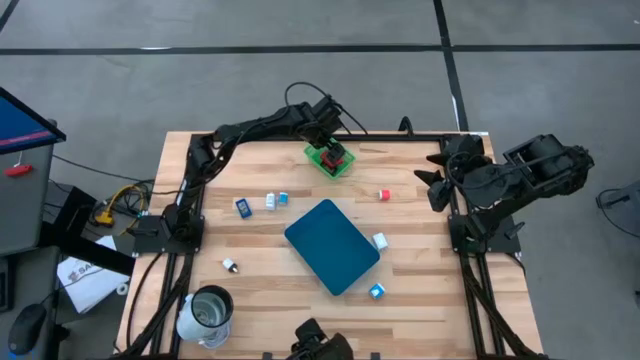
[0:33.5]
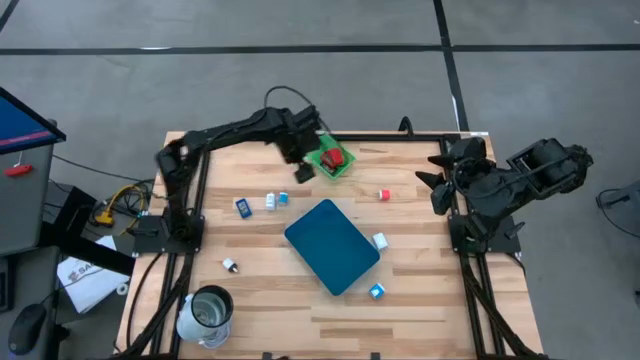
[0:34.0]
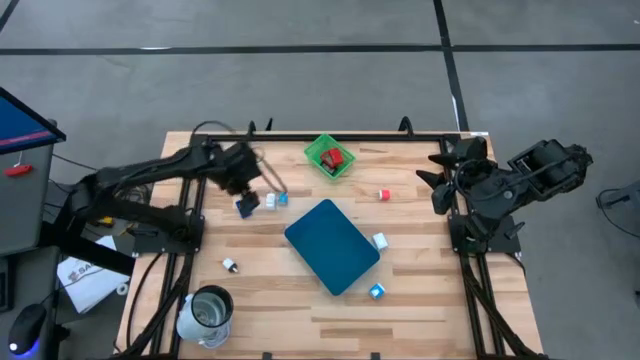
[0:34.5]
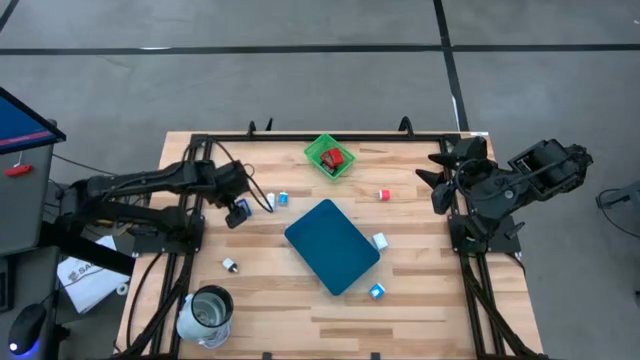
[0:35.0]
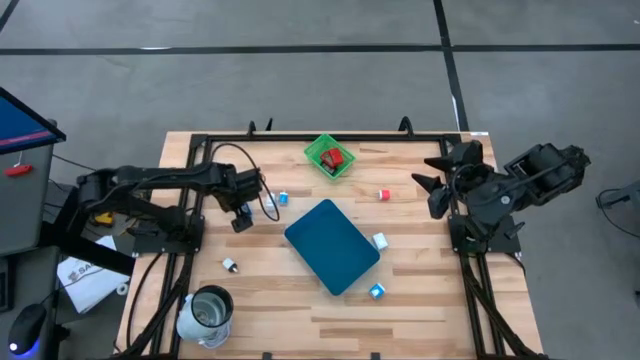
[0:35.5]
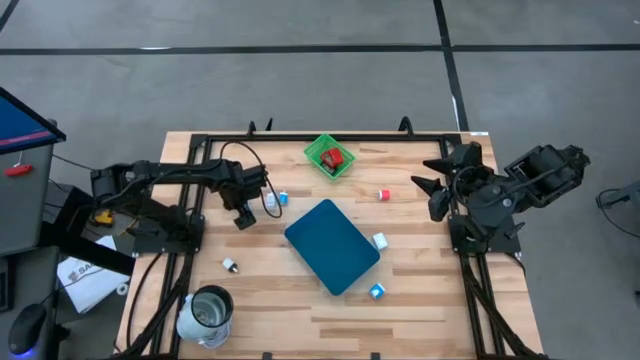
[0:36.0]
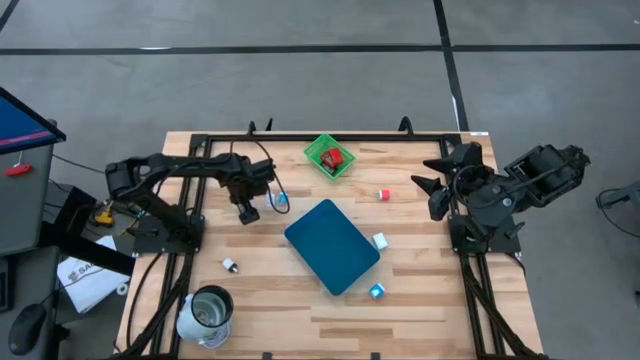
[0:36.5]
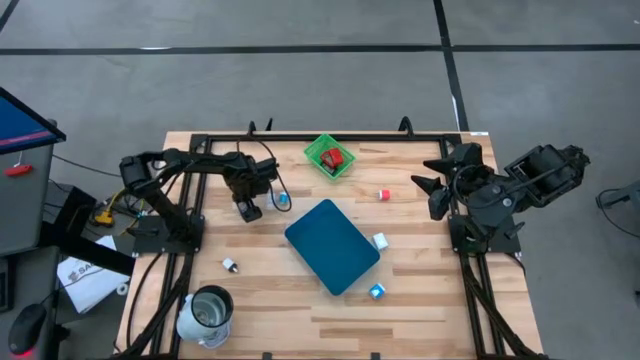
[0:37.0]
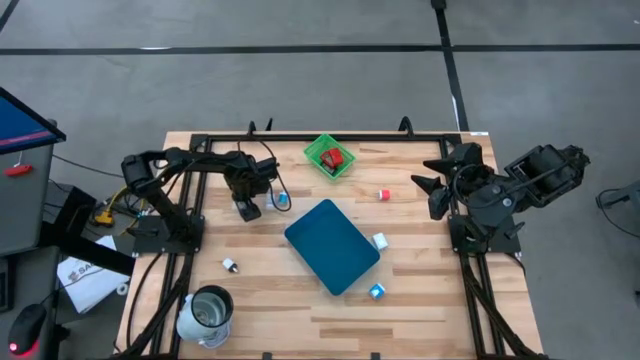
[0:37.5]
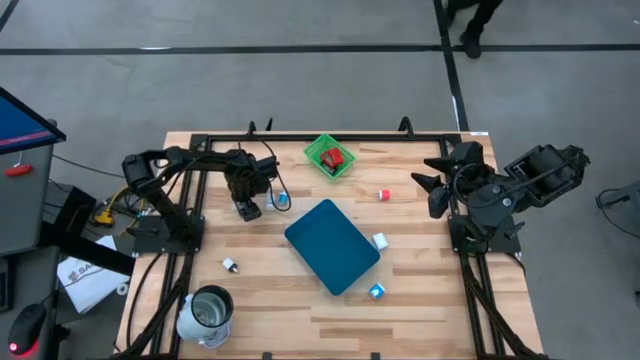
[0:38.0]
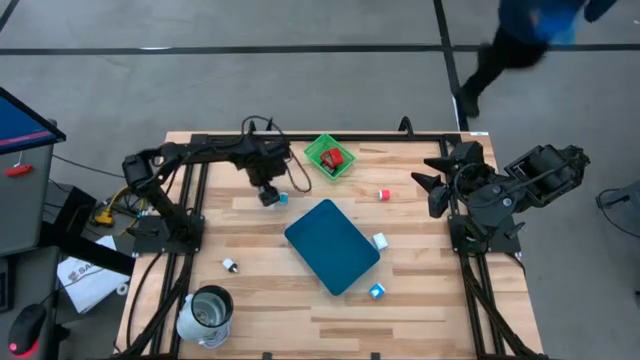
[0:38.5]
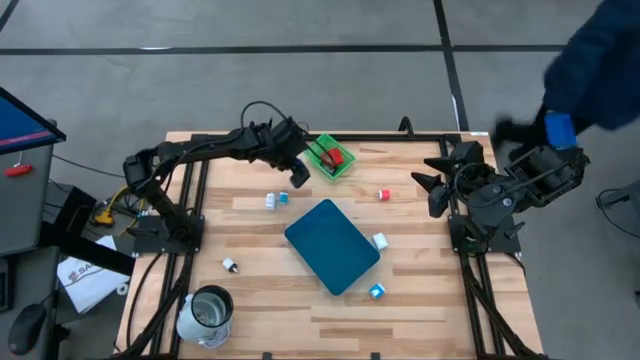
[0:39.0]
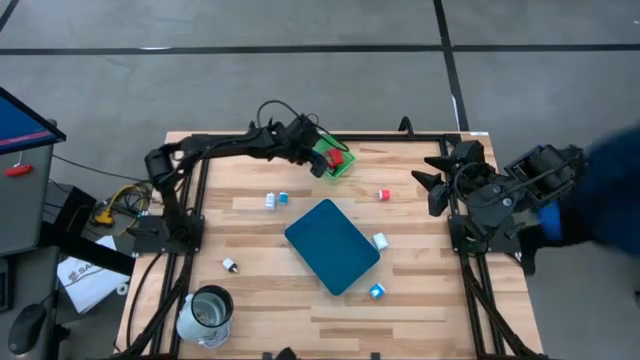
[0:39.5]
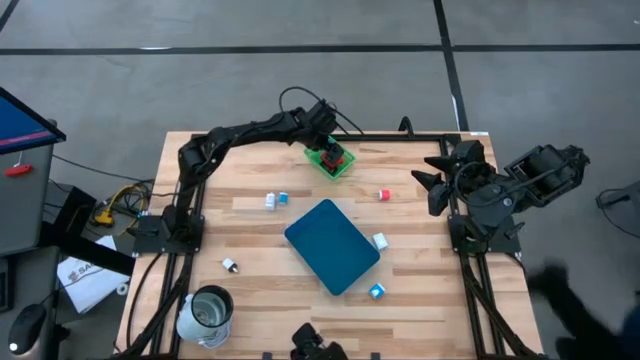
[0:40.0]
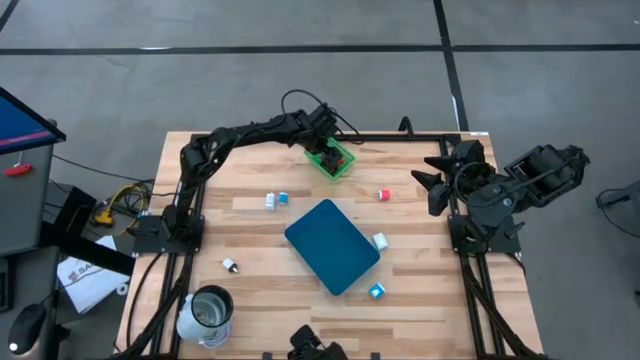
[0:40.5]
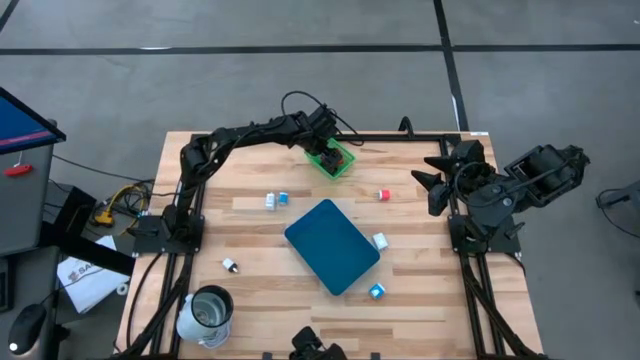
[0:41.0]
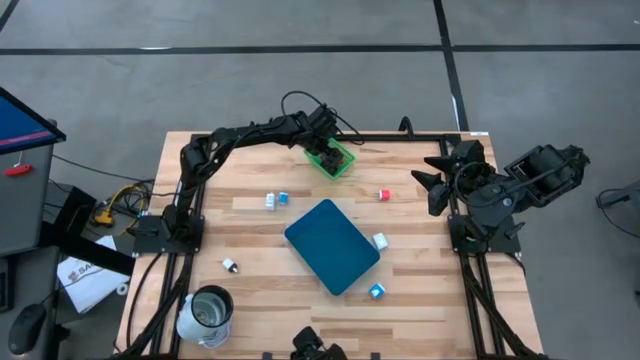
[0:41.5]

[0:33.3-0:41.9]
Task: Pick & Place Office items
Put the blue digital timer into the green bin

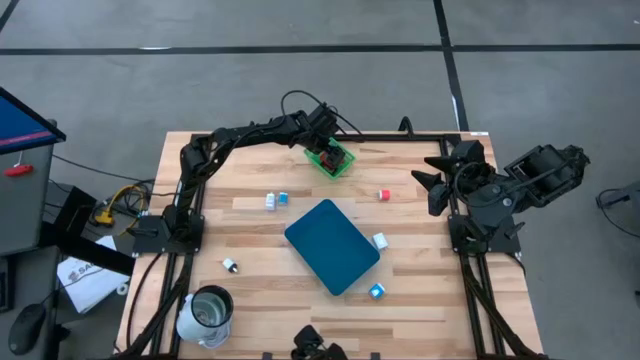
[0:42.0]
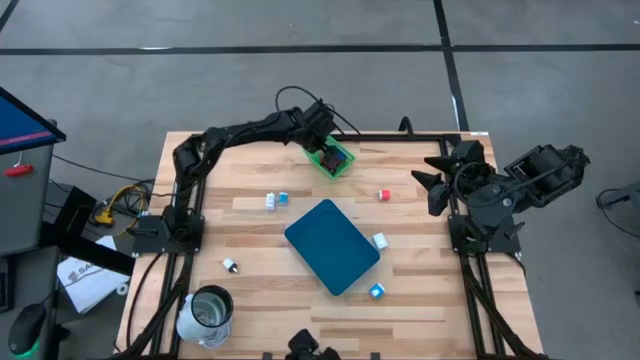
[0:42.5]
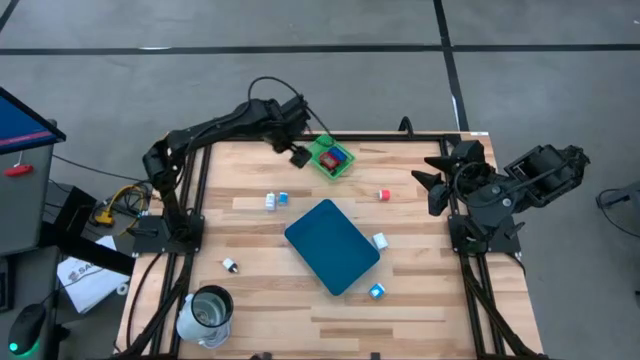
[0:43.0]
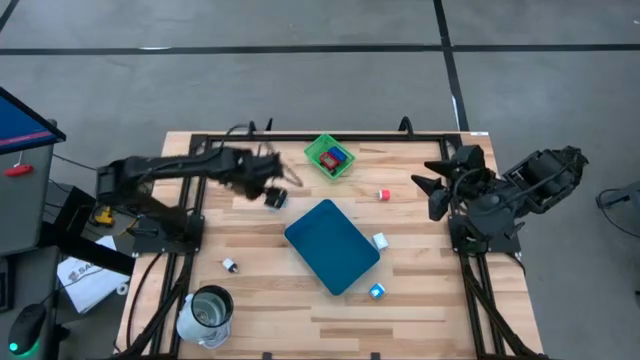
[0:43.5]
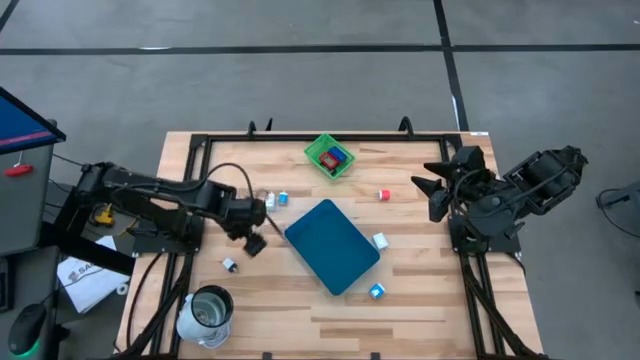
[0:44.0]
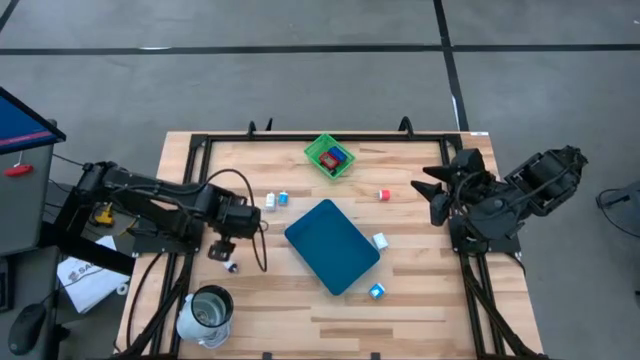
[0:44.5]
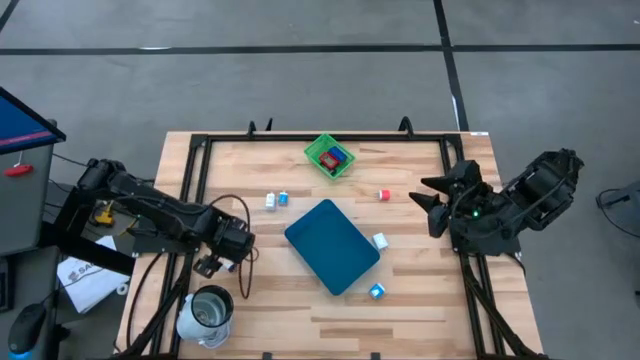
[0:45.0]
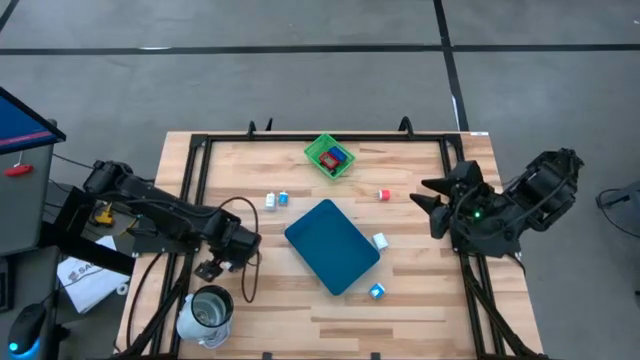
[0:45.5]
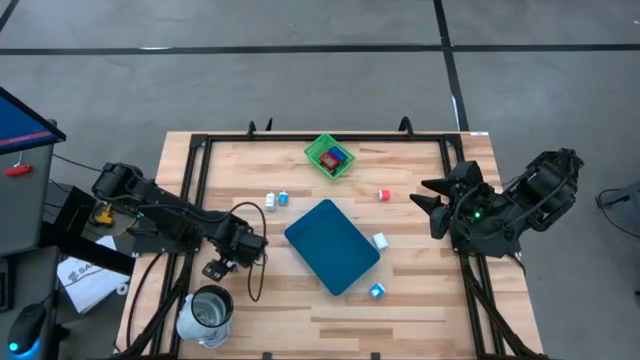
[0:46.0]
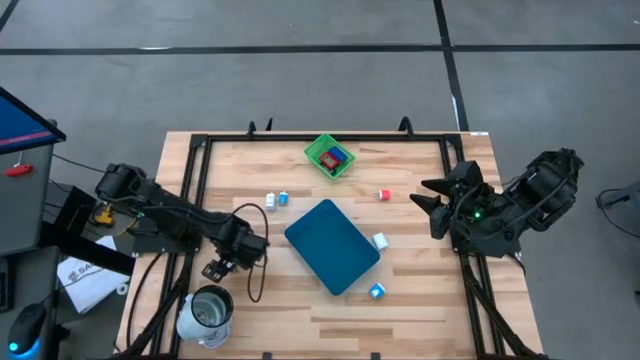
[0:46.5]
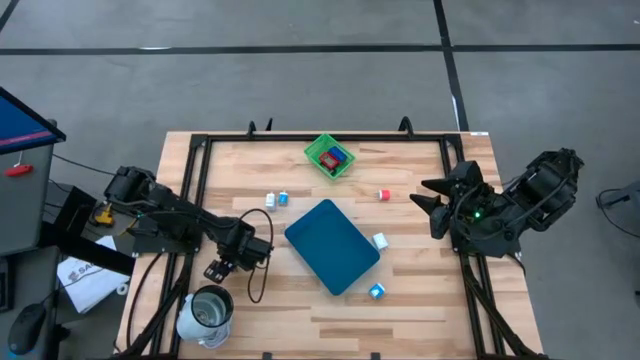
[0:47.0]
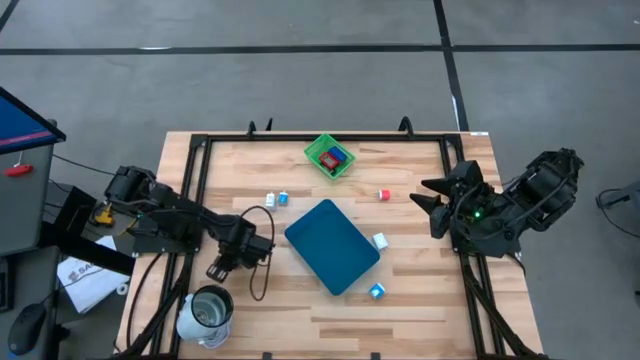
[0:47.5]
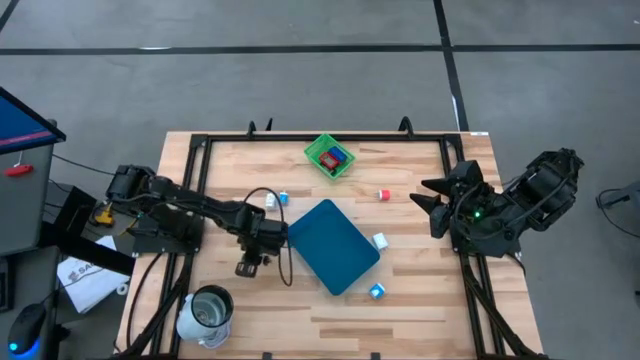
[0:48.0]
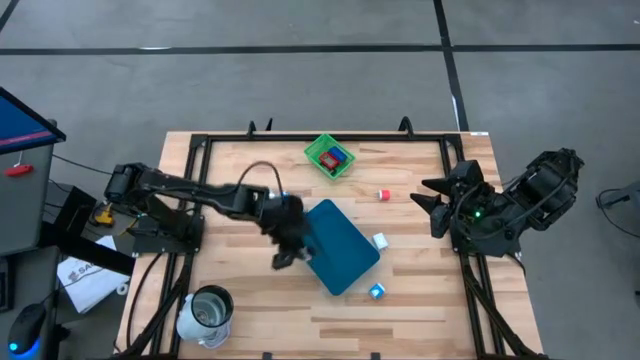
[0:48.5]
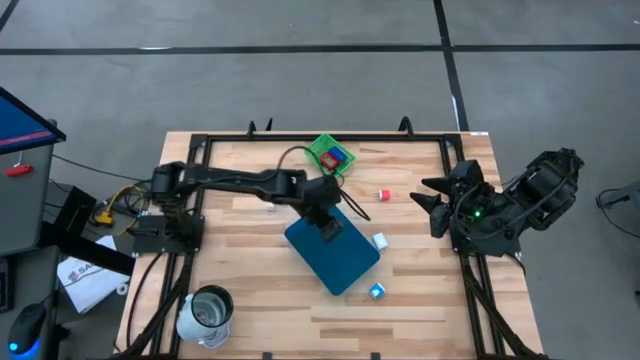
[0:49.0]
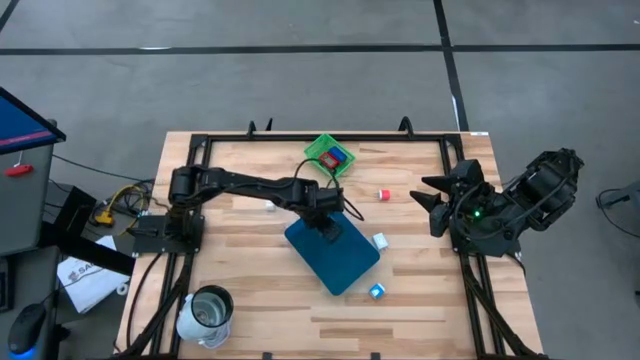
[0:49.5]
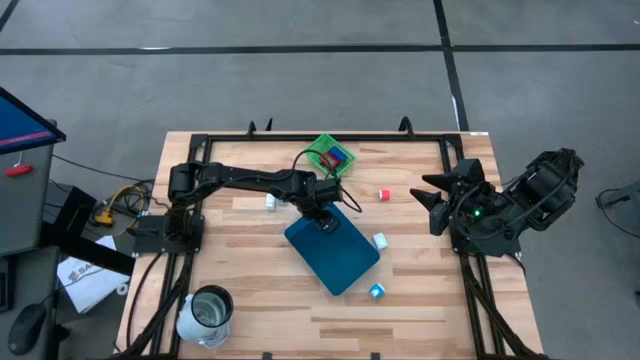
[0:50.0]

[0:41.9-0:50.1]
Put the bottom left white charger adapter into the blue bin

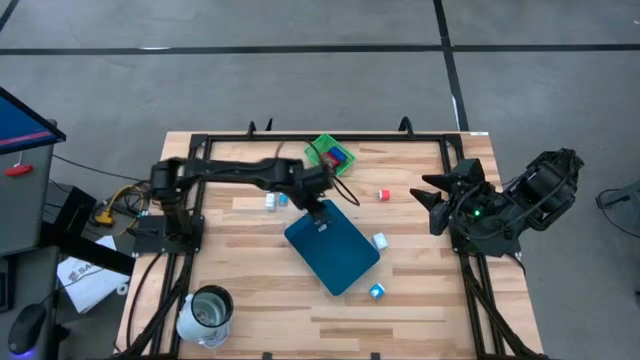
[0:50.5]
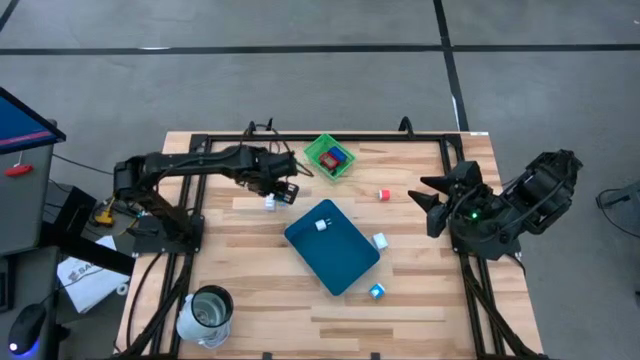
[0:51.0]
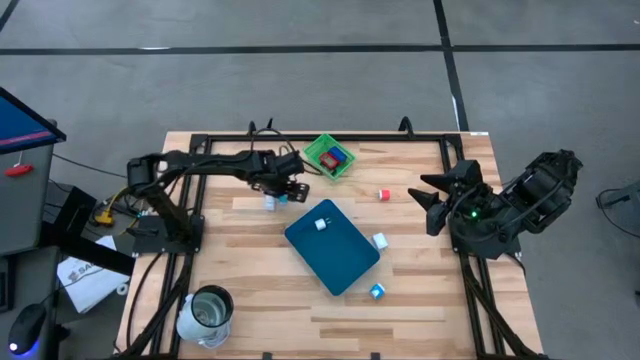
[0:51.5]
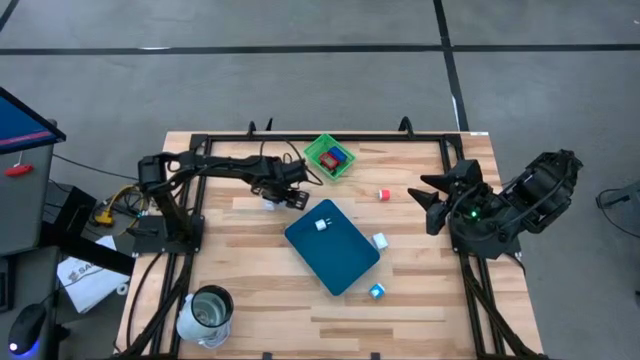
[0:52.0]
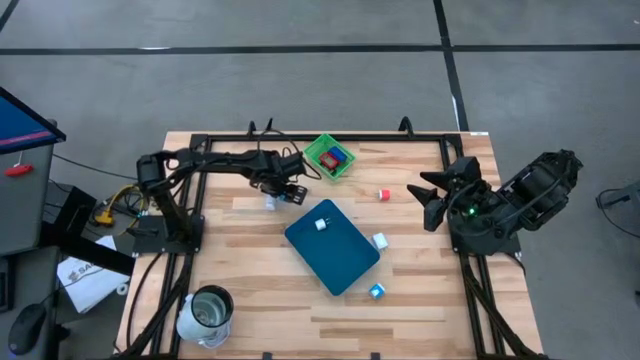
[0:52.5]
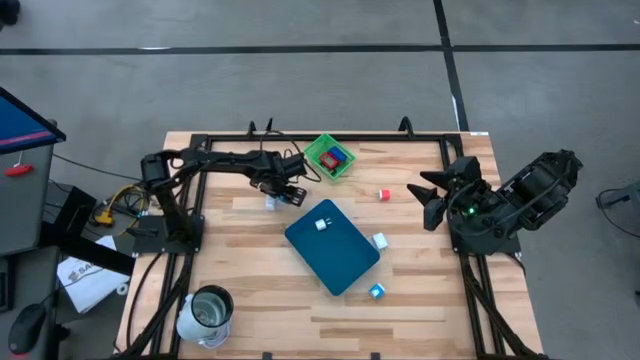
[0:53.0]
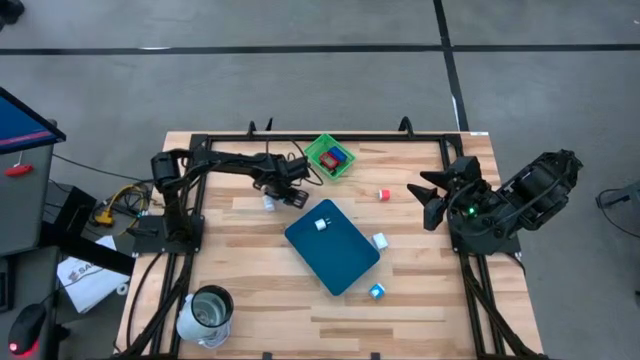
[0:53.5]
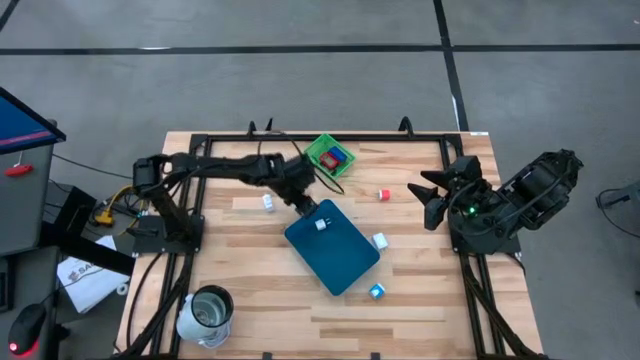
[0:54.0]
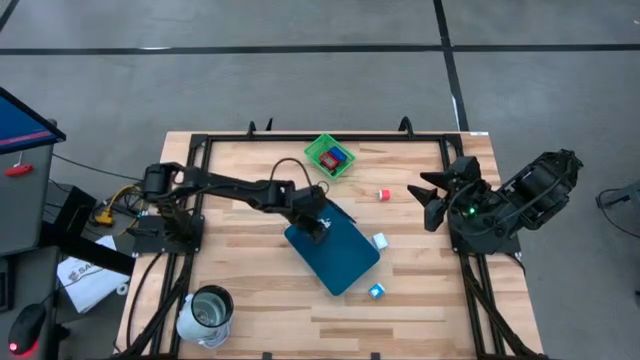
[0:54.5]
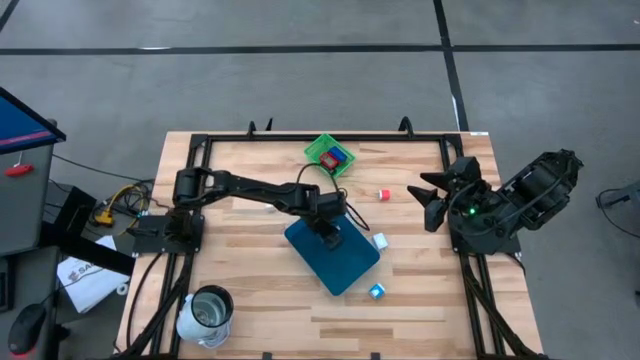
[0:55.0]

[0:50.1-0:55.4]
Put the top blue charger adapter into the blue bin

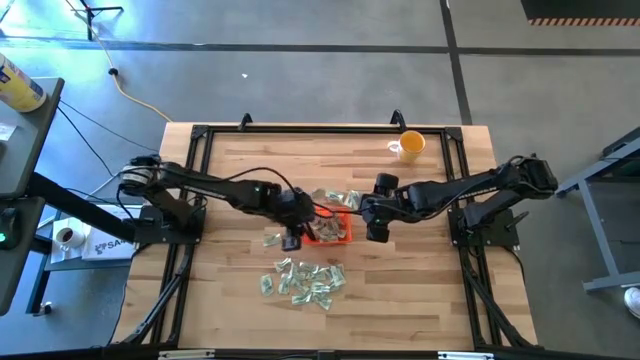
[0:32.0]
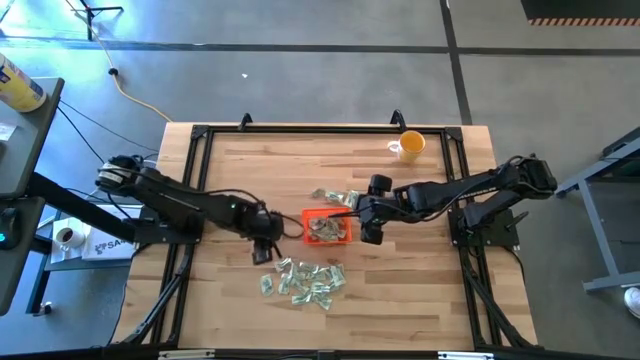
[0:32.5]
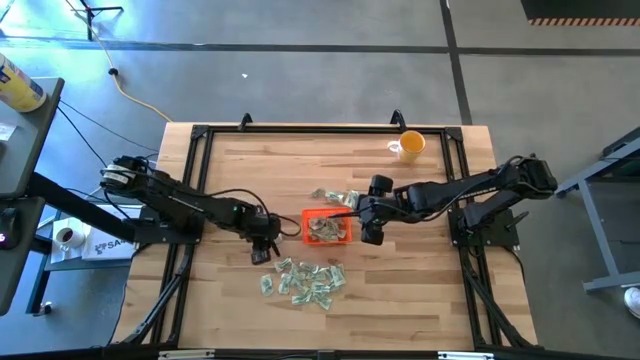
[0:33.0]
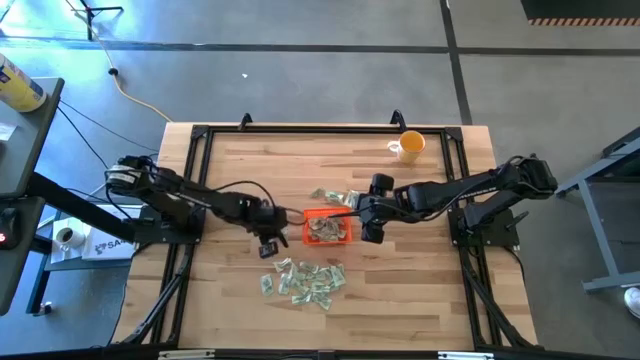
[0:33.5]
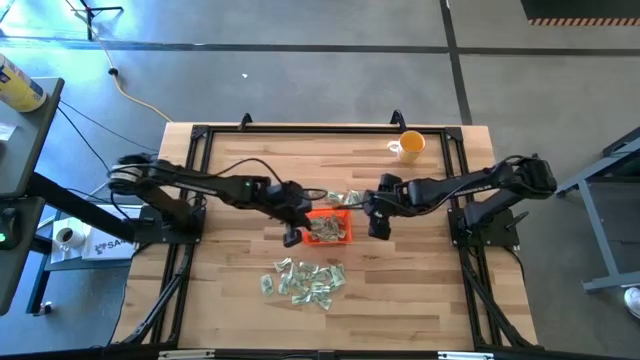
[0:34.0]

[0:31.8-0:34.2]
Task: Pick and place Stevia / Truvia into bins
Put the stevia packet into the orange bin
